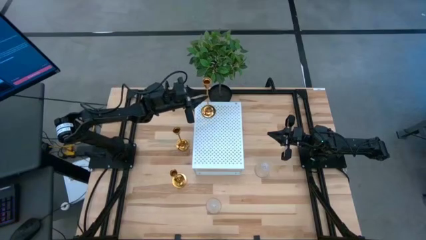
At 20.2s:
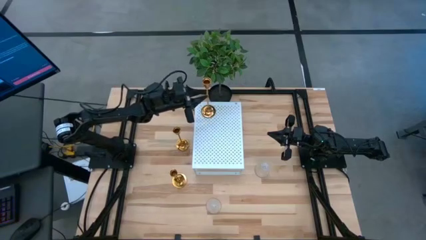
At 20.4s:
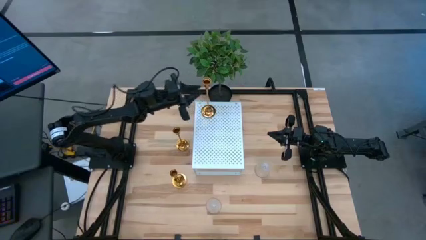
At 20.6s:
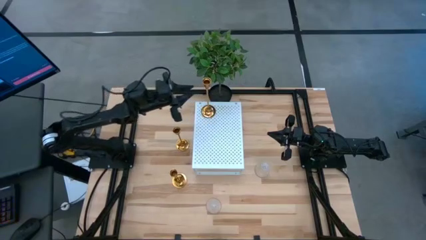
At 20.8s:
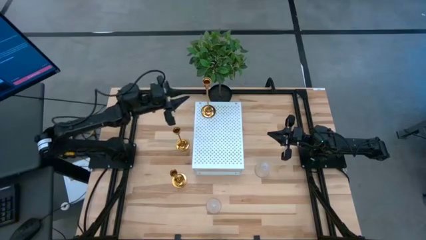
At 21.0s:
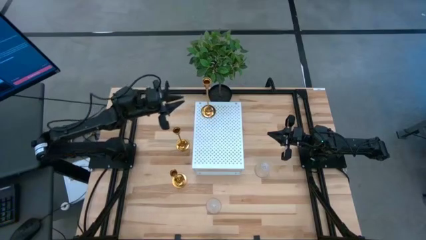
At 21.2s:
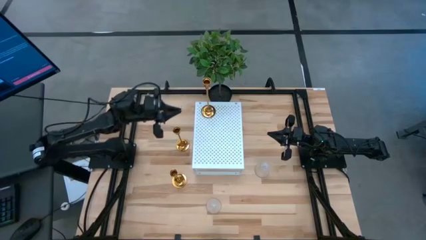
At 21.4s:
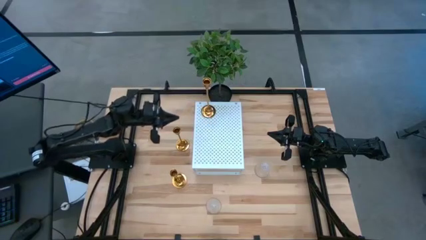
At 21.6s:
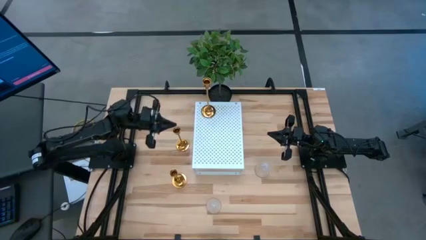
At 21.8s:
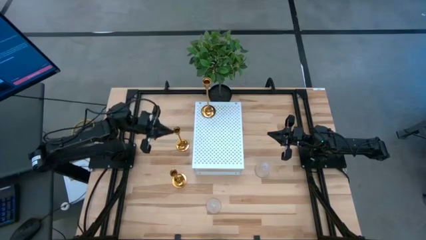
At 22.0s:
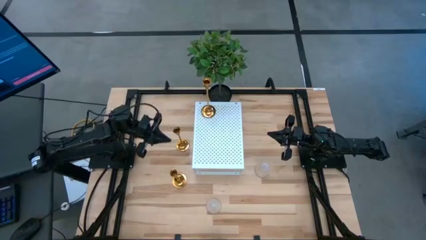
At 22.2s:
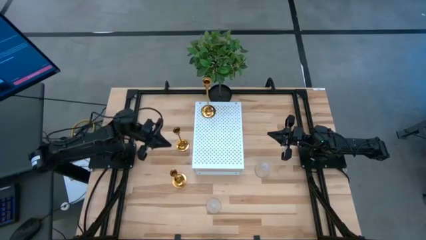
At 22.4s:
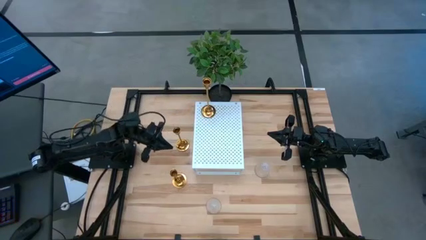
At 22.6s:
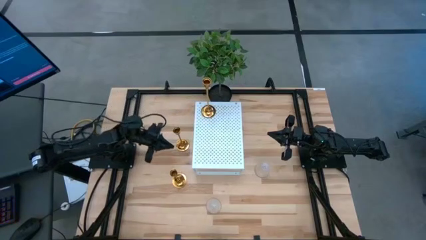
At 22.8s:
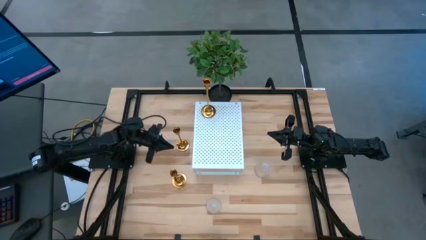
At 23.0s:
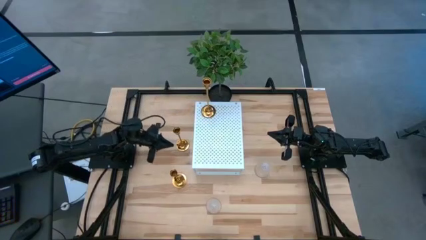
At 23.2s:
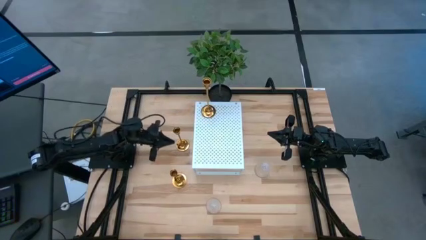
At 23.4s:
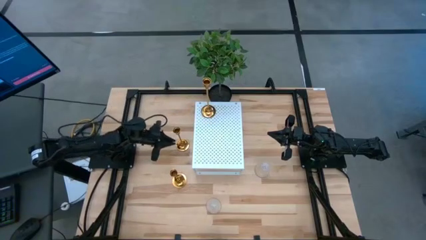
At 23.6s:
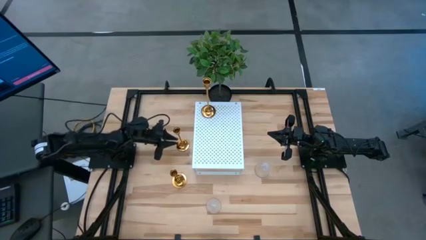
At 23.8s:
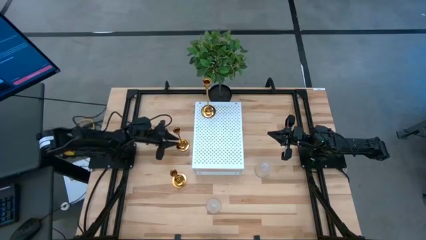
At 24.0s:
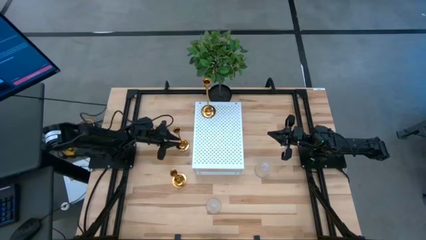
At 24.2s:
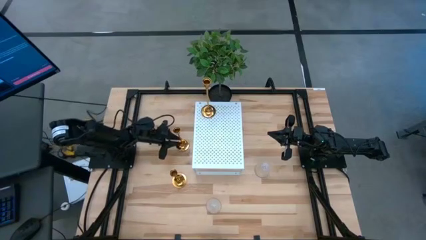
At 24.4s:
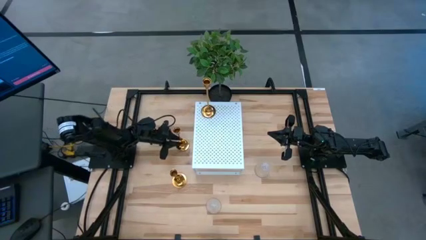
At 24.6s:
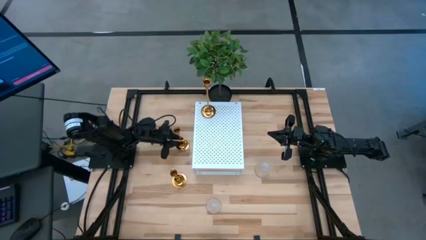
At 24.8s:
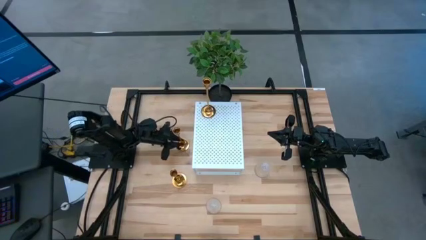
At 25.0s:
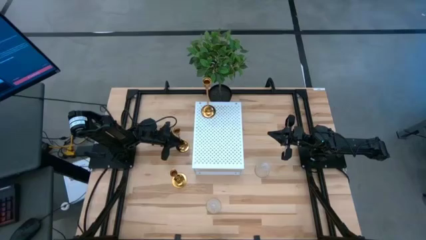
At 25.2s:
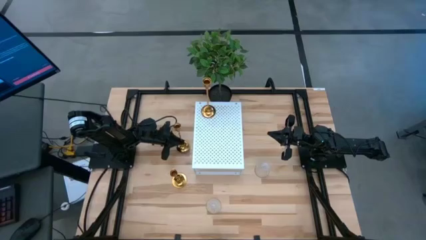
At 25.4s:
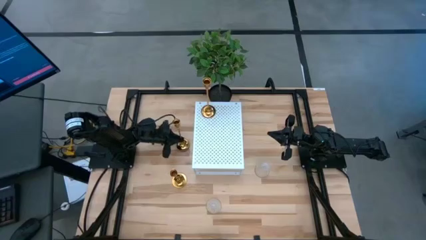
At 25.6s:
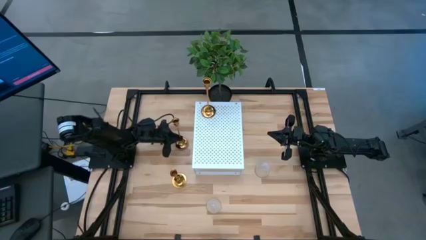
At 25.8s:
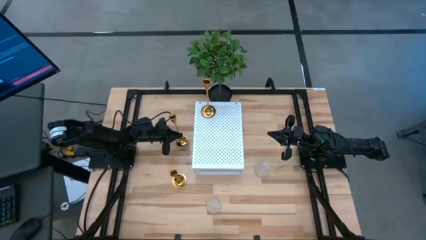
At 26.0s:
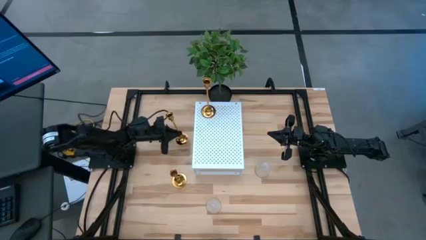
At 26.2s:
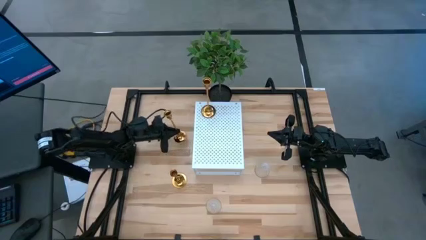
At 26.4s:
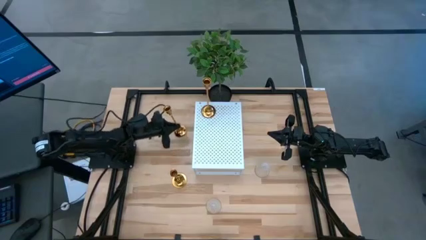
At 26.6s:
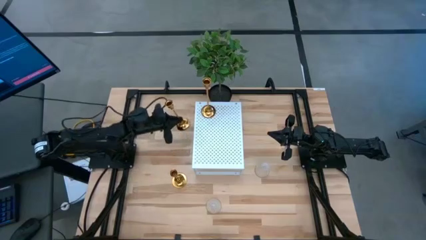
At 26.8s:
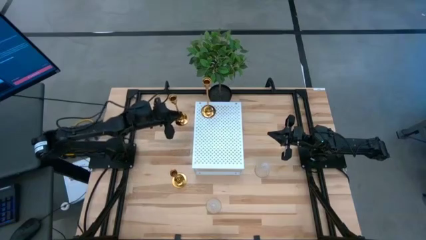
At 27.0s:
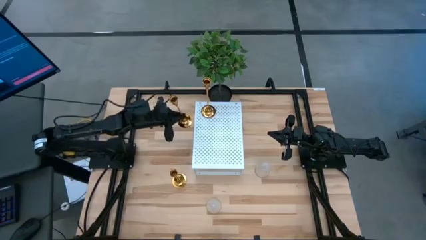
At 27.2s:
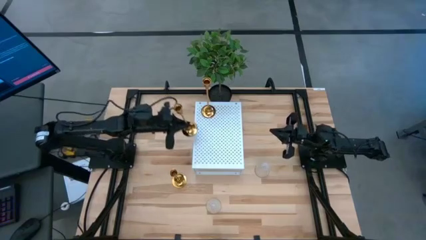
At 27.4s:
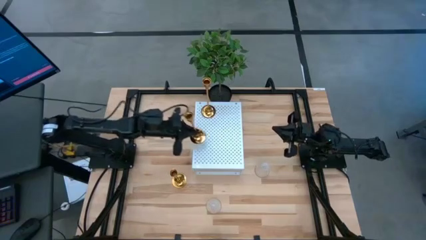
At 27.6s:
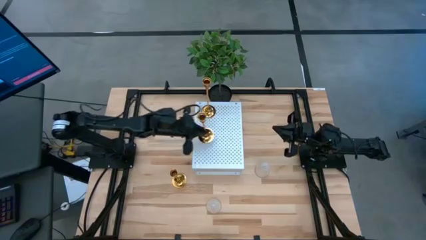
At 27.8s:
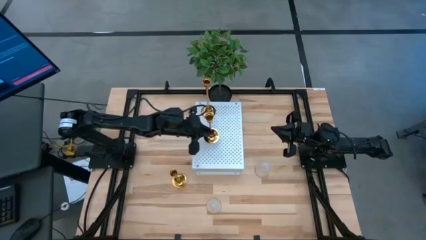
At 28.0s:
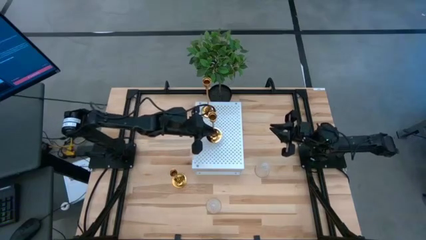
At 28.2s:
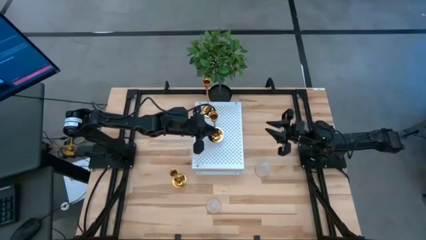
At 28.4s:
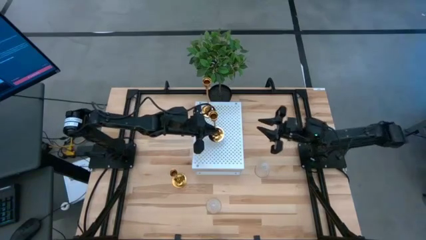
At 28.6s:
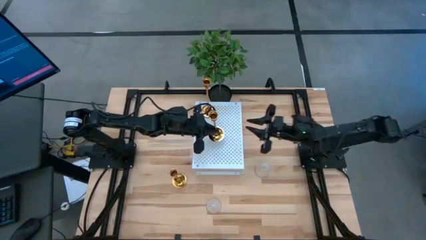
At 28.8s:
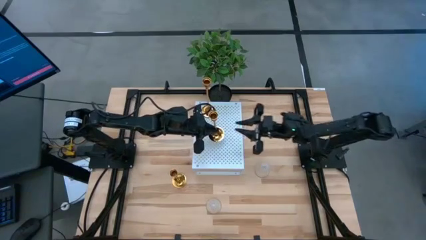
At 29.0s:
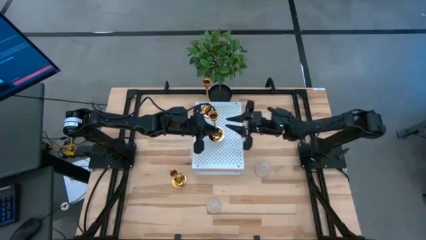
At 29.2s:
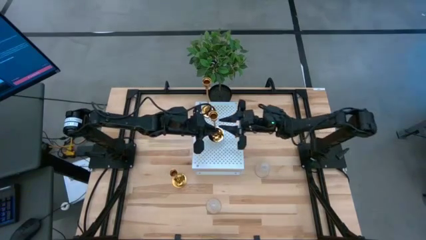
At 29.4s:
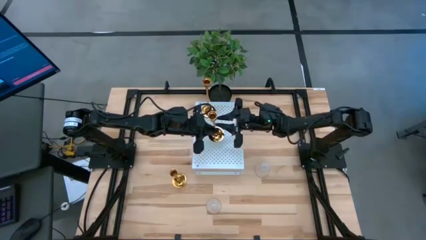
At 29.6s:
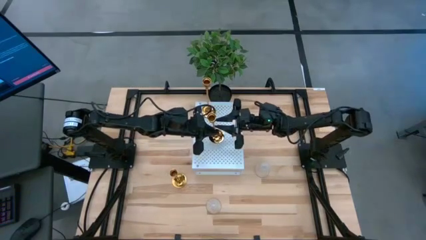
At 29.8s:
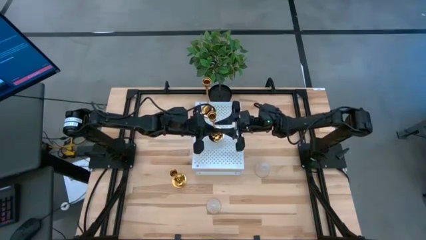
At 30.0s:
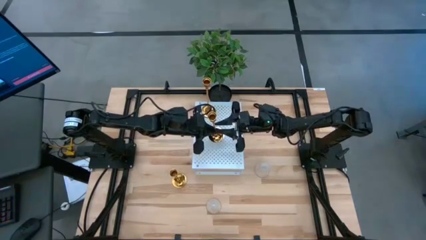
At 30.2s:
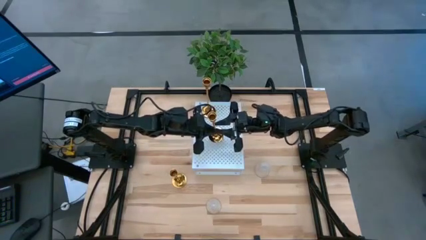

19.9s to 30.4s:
Task: Pick & Place candle stick holders
Align the top gold candle holder with the other gold candle holder on the shelf
